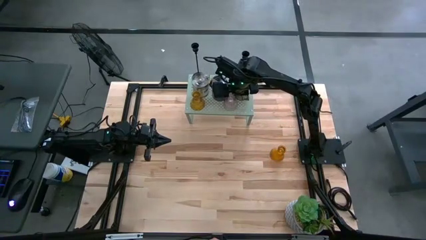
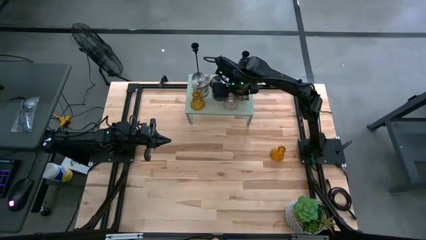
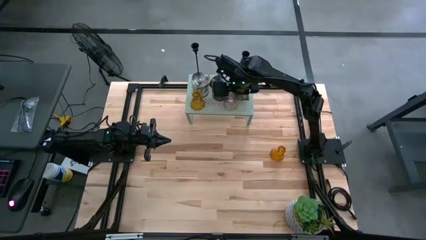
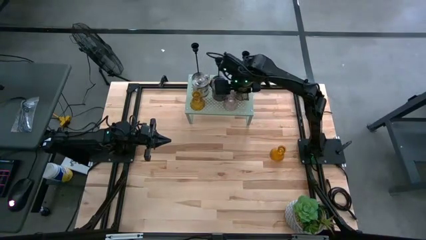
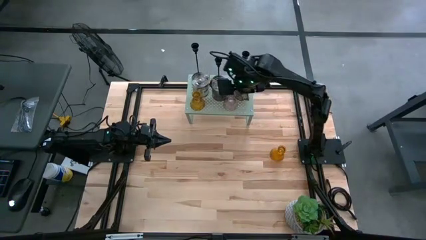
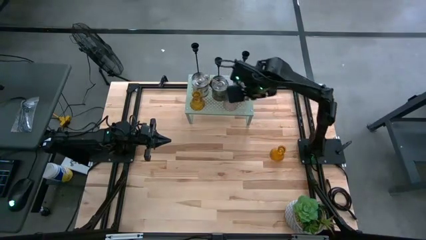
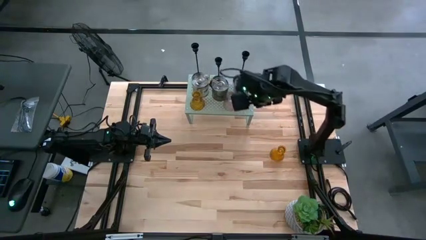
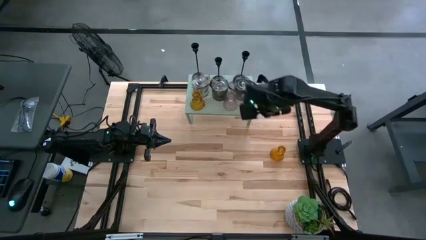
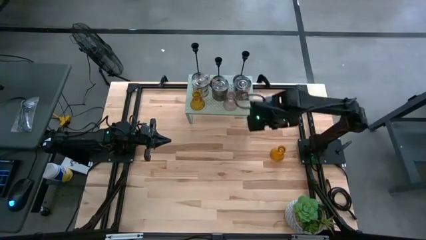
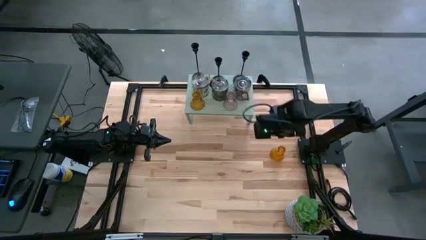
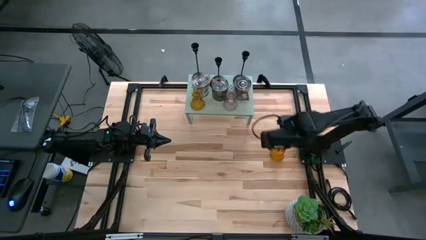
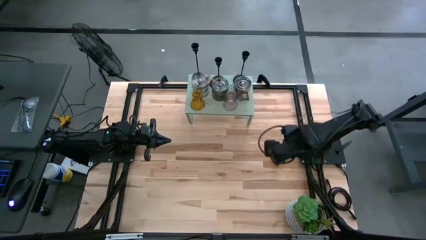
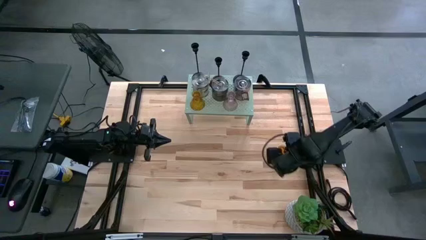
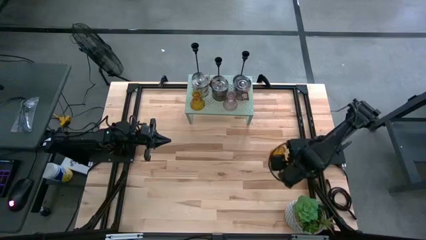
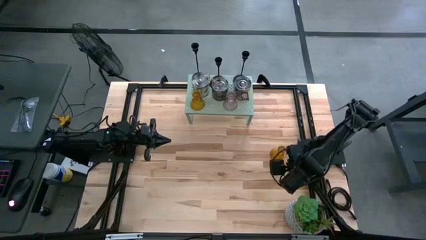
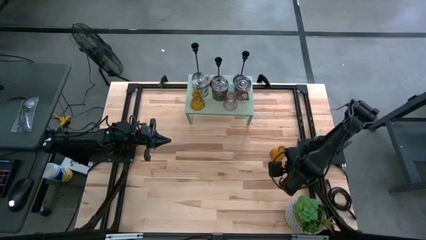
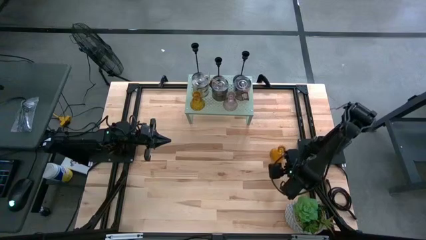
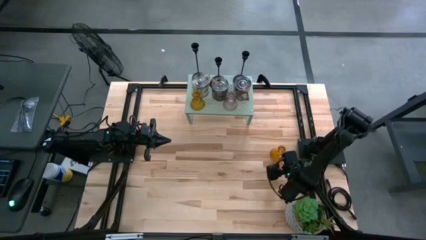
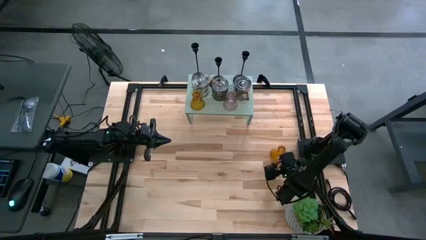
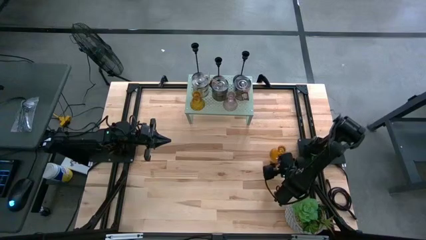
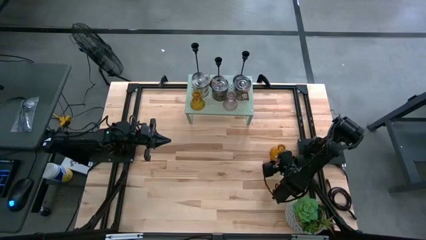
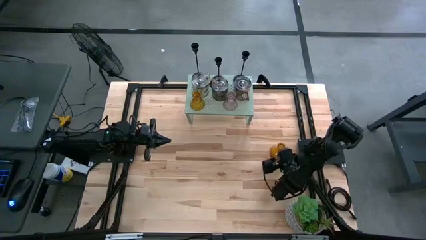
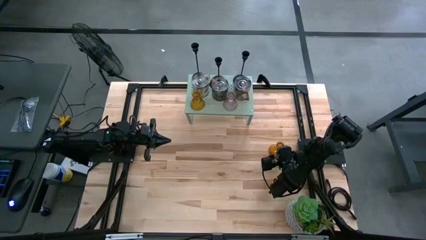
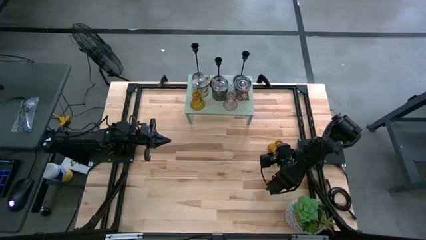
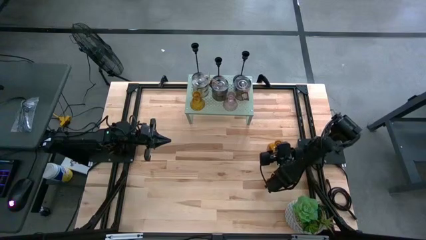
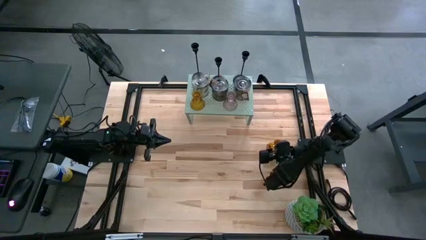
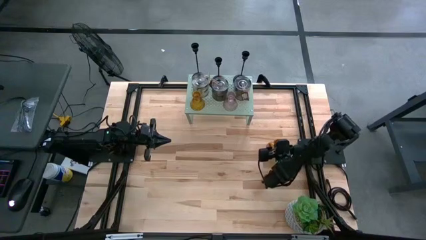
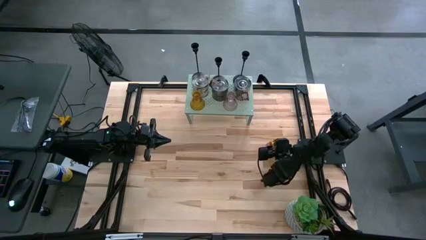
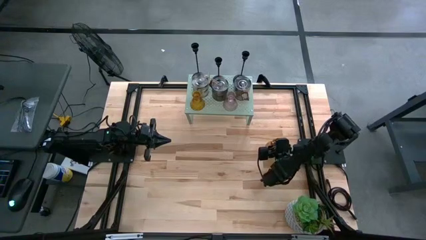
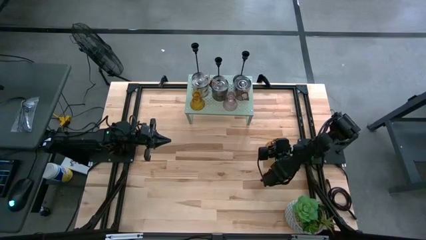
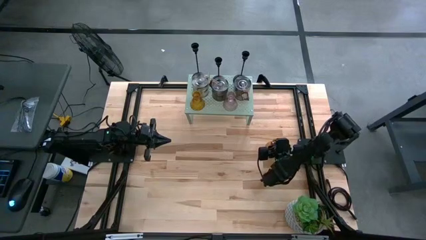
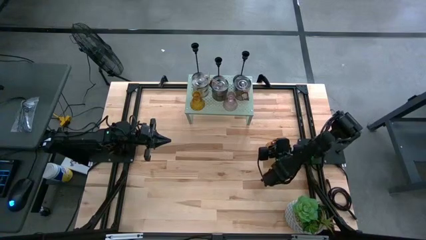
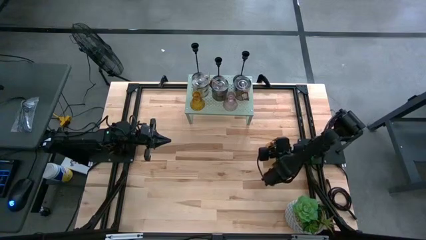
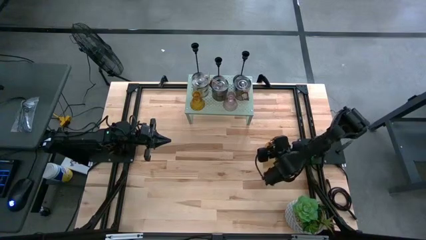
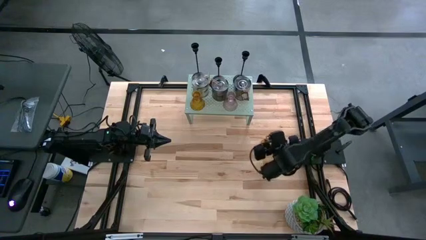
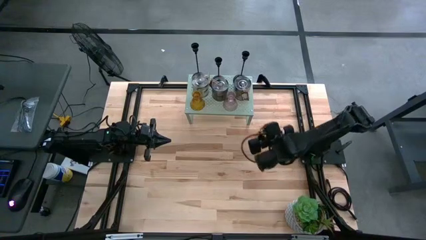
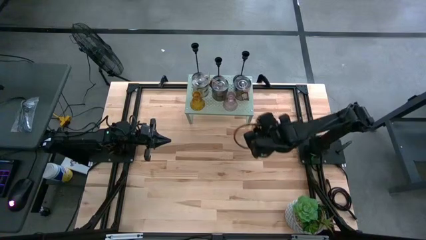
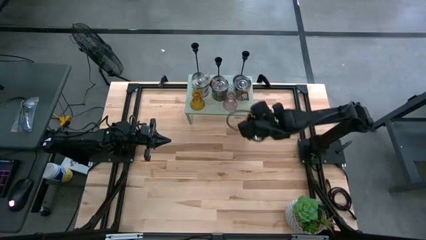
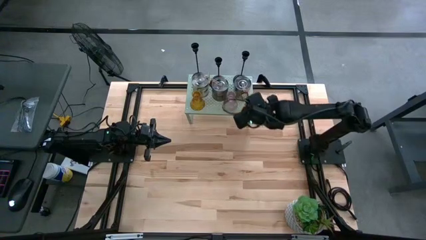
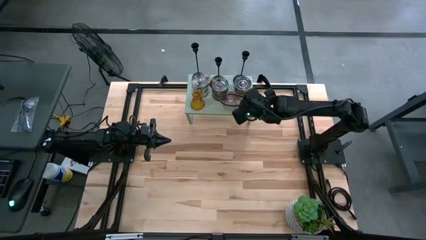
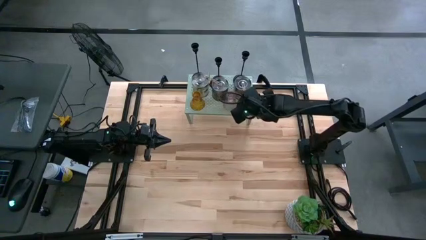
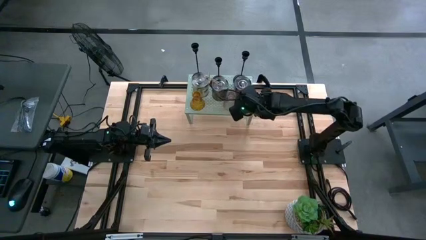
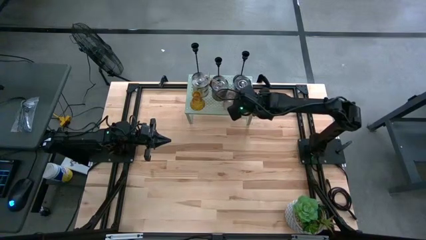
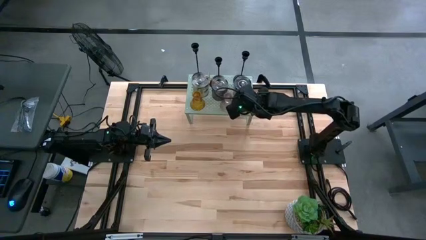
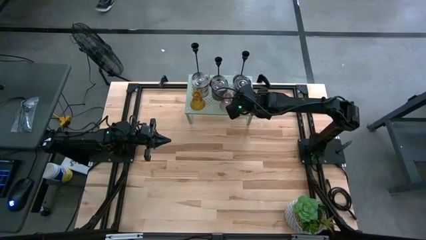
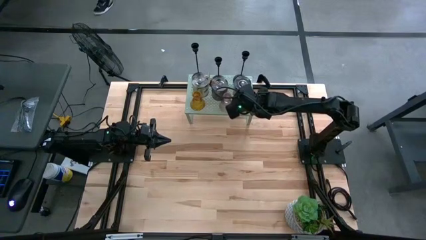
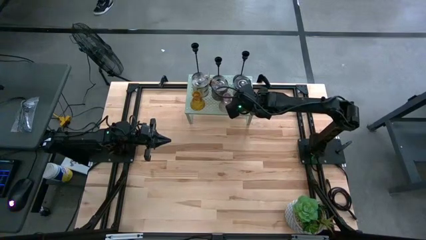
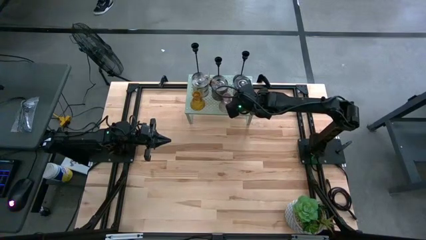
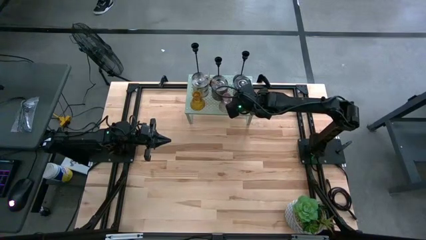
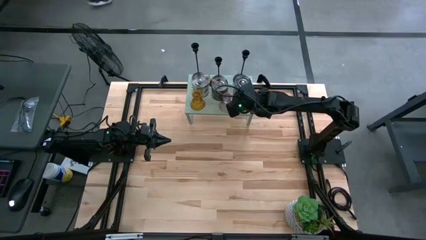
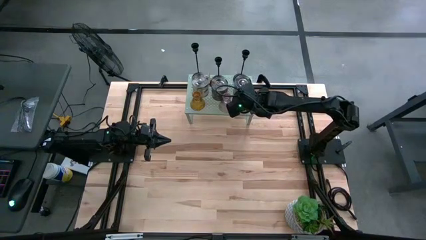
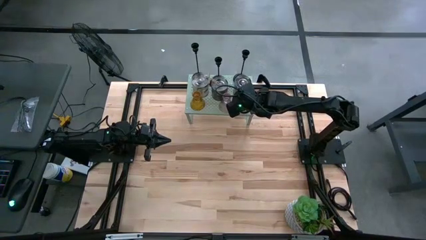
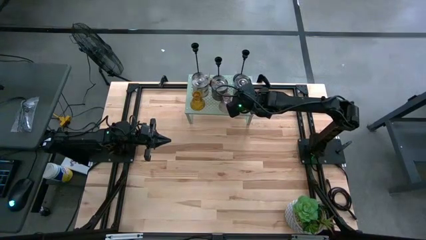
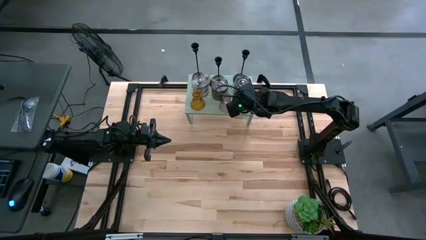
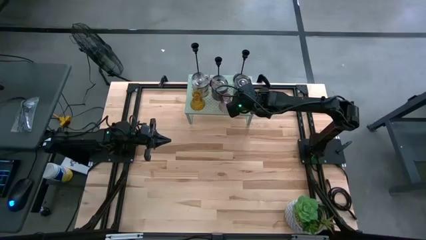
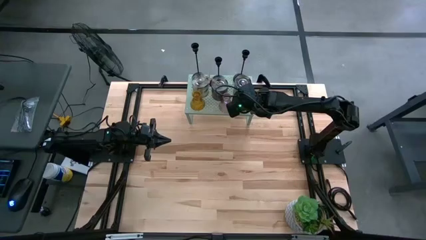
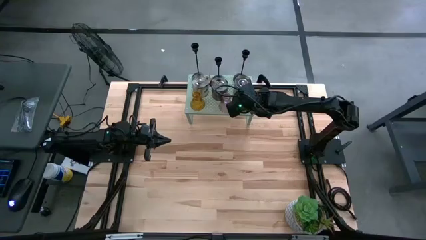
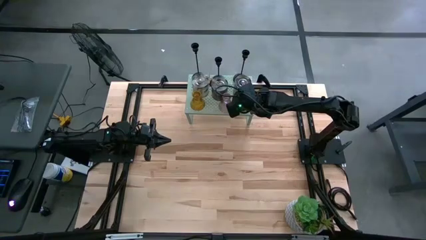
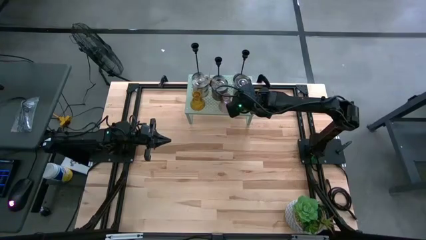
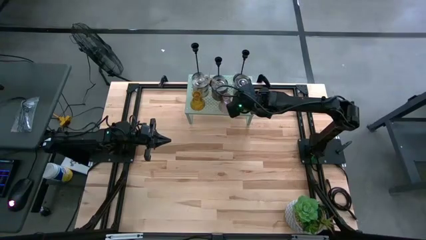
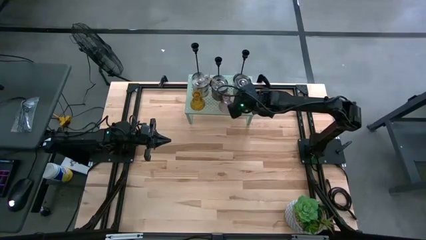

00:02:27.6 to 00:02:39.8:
Task: Pick & Place candle stick holders
Put the orange candle holder on the shelf

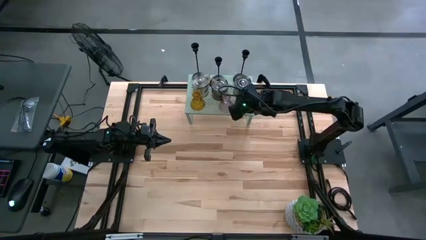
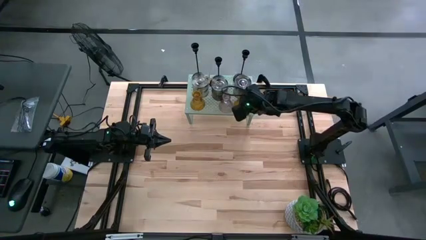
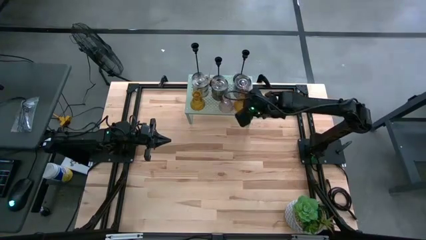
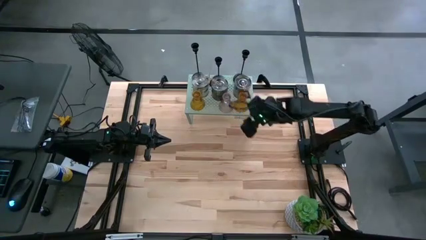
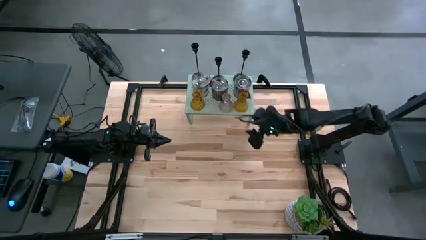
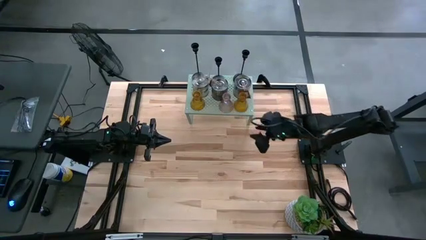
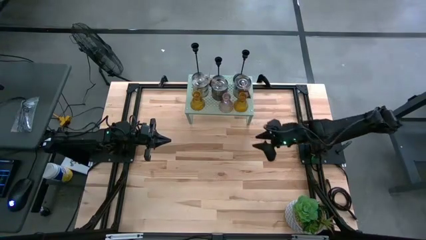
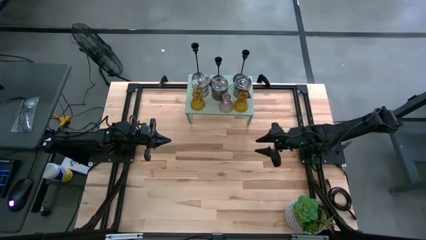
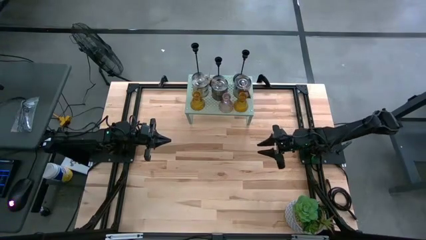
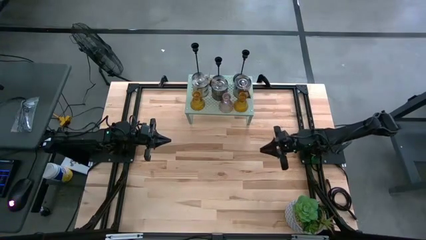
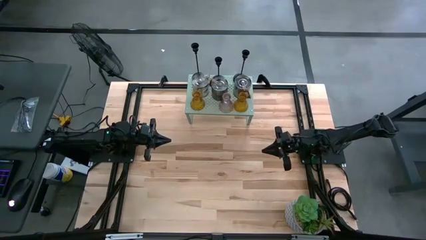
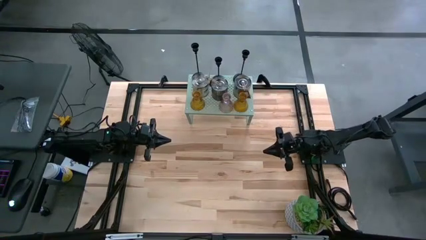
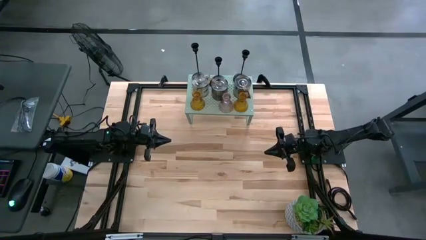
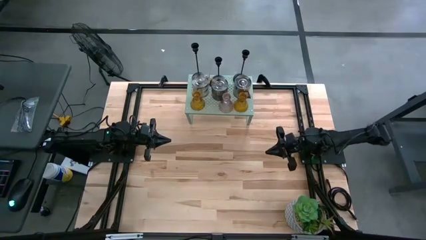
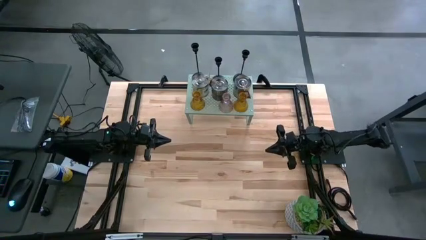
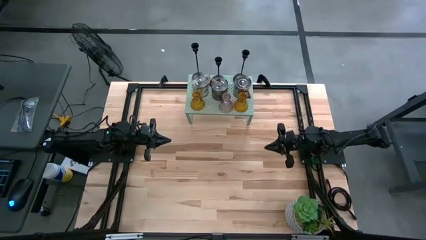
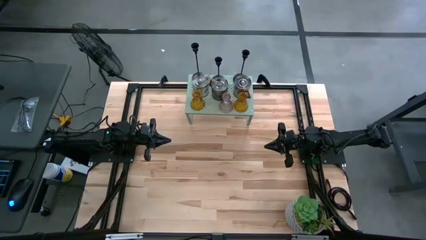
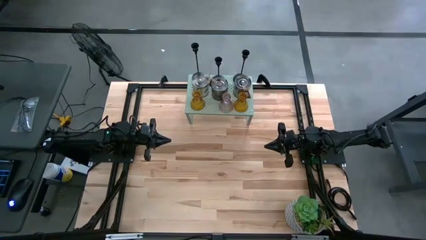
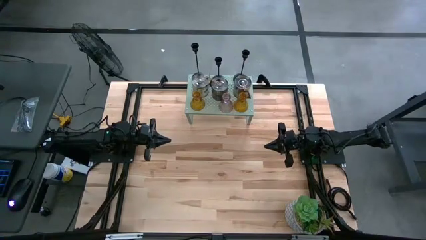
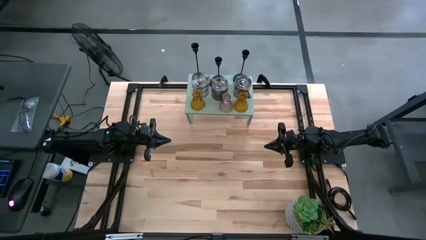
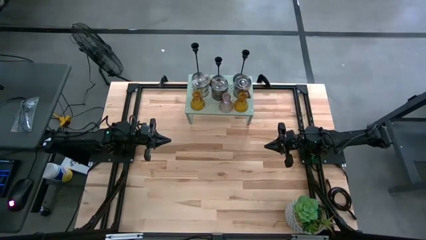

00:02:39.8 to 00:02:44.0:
Return to Home Position
